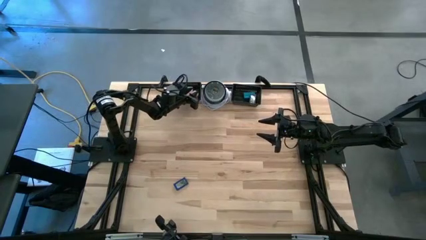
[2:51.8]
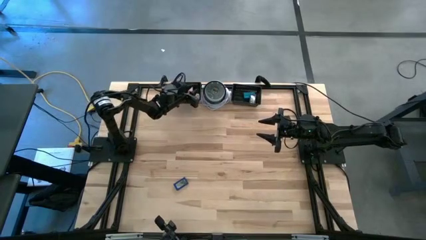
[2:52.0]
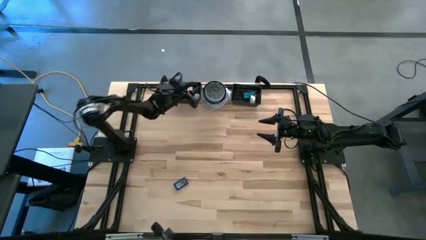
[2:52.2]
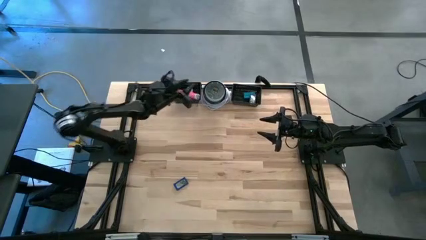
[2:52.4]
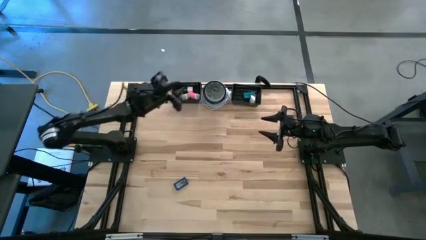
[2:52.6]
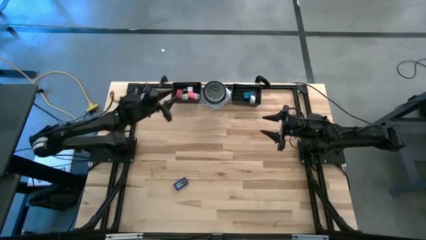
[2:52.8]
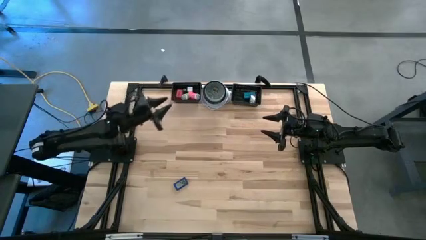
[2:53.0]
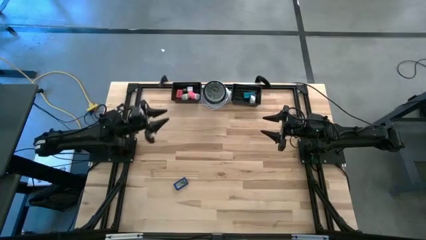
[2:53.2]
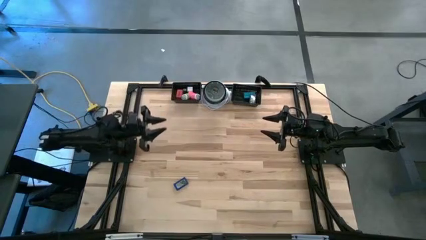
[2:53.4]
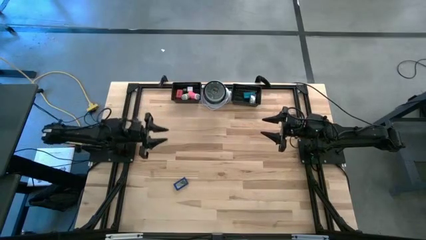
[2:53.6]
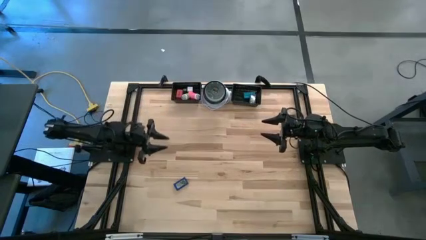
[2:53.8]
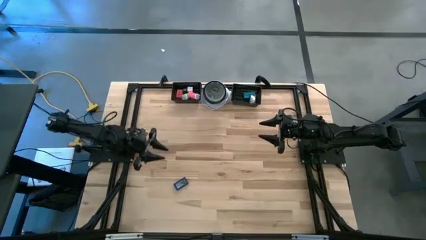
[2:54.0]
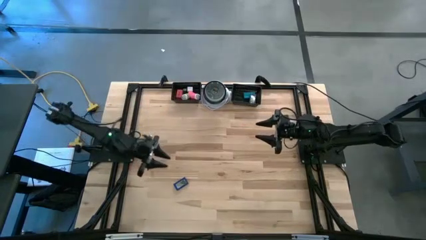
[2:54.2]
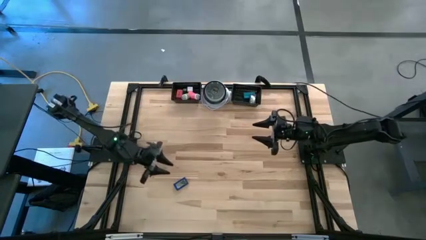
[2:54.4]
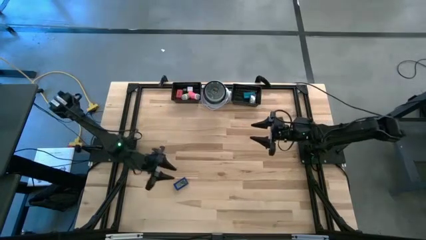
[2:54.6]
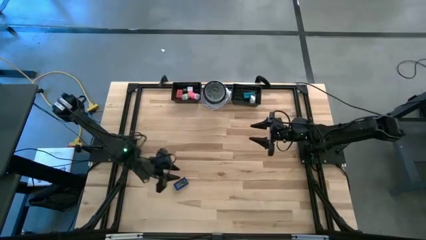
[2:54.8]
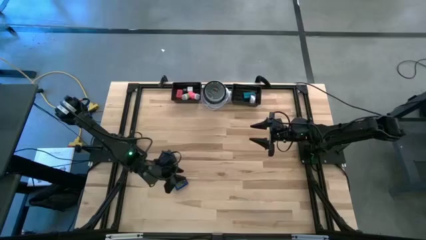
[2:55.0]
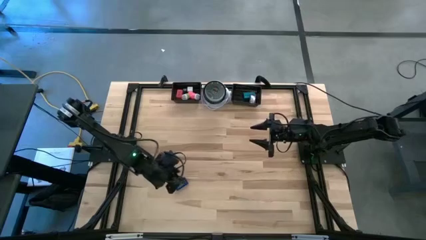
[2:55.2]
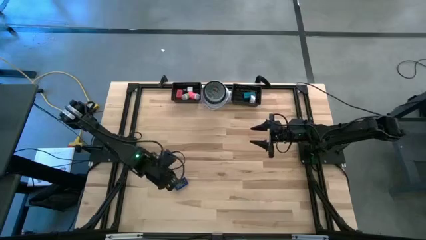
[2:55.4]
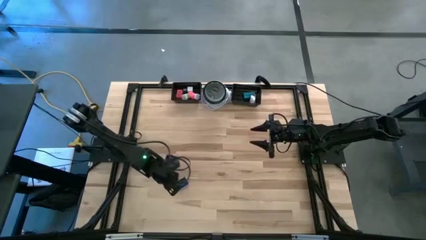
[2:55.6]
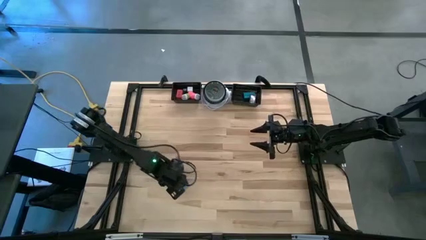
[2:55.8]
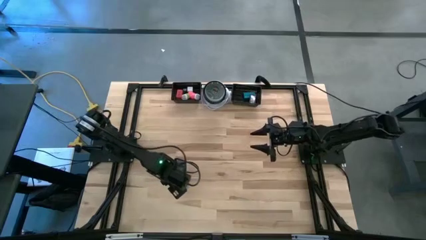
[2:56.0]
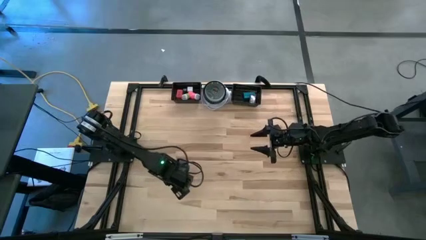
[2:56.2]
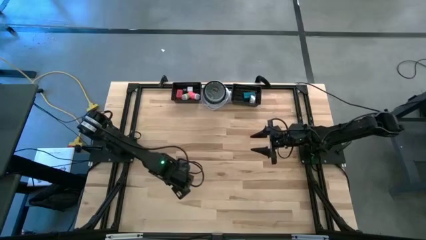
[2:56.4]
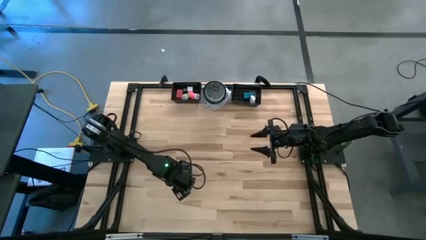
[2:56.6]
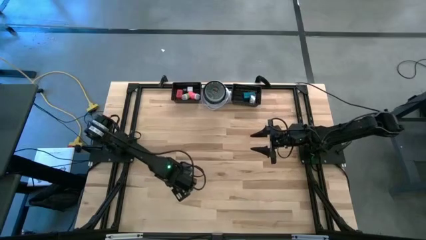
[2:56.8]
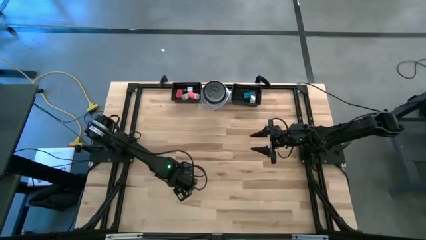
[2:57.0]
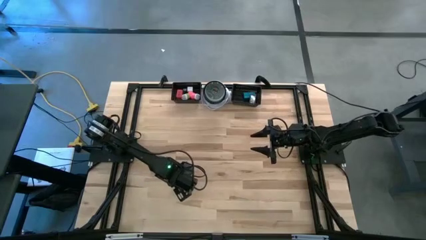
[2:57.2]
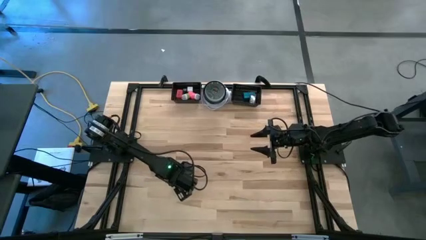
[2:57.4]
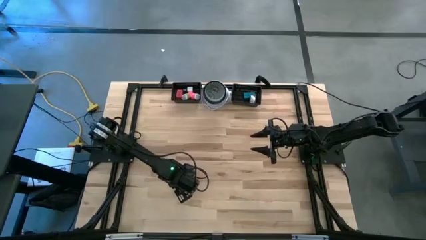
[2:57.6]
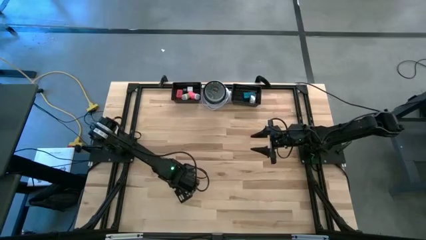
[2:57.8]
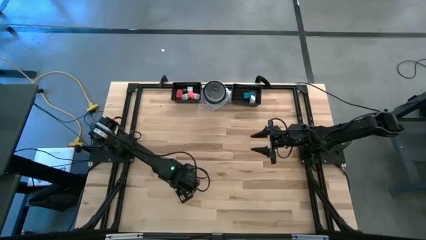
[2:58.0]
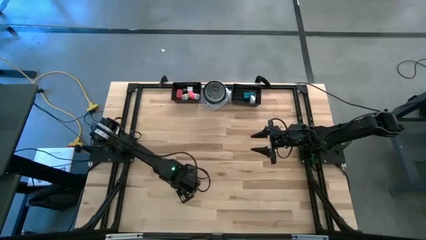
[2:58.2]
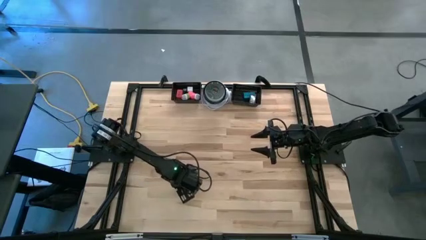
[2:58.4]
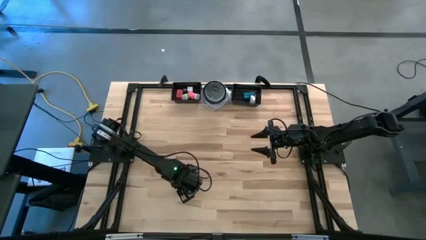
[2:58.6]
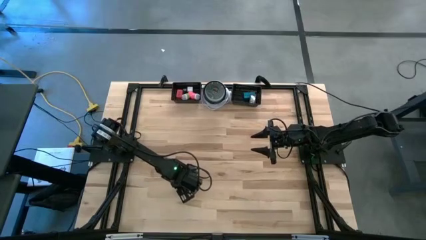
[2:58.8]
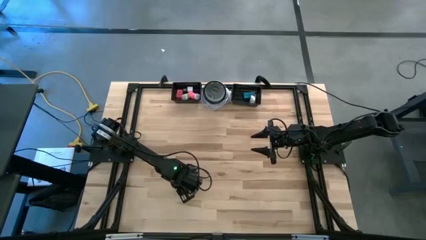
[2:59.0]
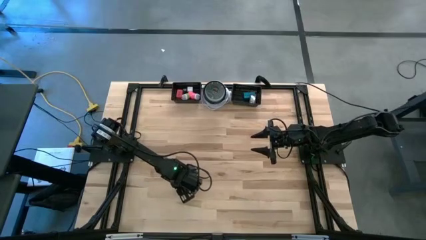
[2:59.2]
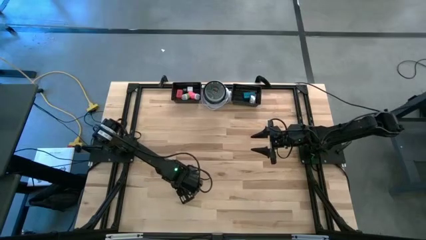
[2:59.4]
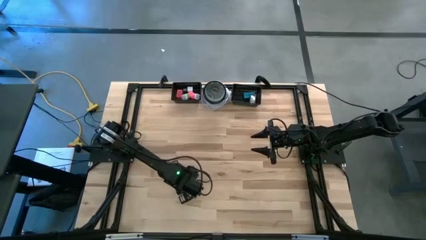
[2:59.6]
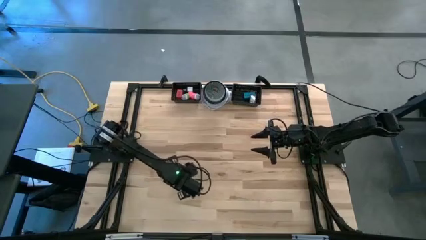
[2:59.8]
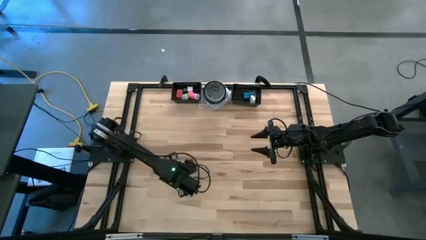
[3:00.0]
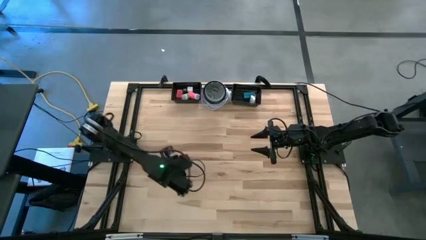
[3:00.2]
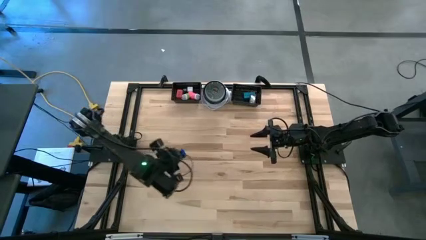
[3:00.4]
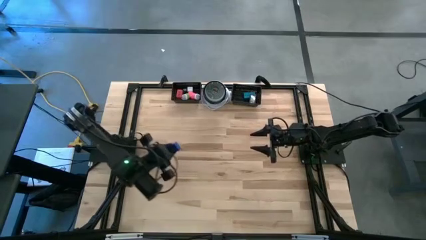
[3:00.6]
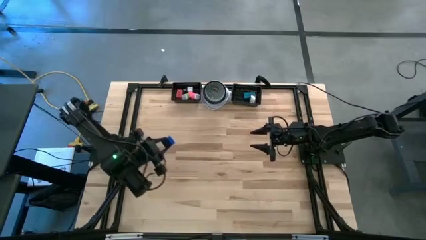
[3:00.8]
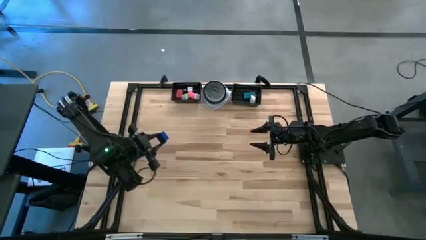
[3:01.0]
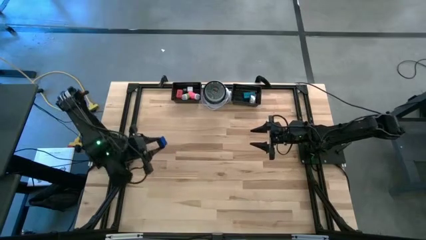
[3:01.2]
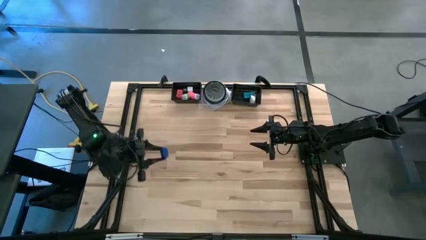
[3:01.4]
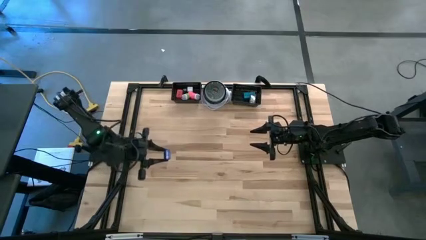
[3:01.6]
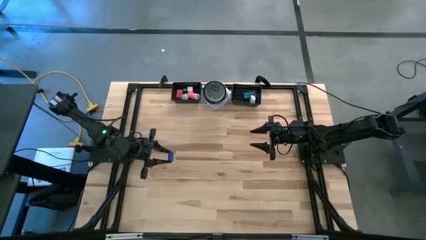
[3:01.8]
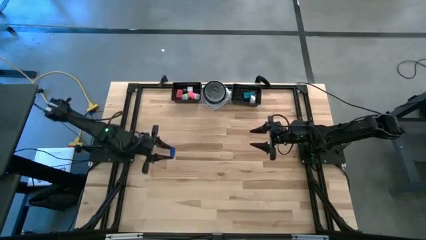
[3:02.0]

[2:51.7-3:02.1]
Task: Pick & Place Office items
Put the blue digital clock into the right black basket
